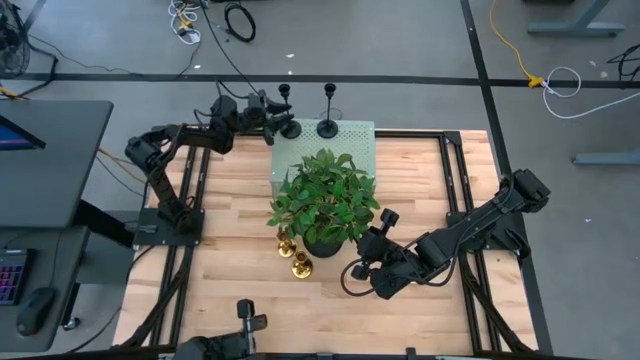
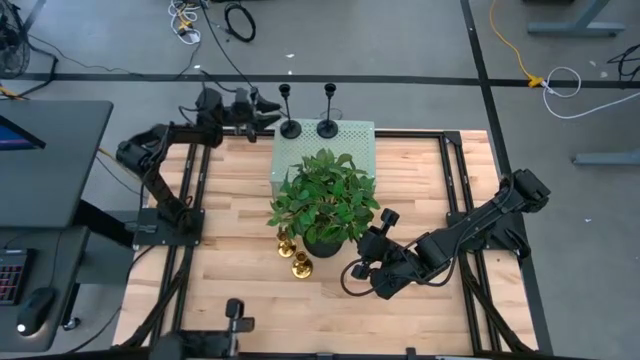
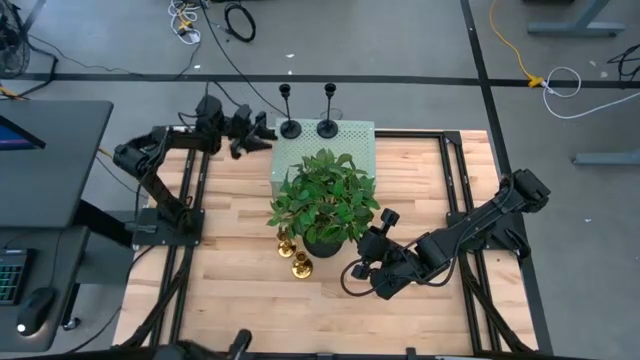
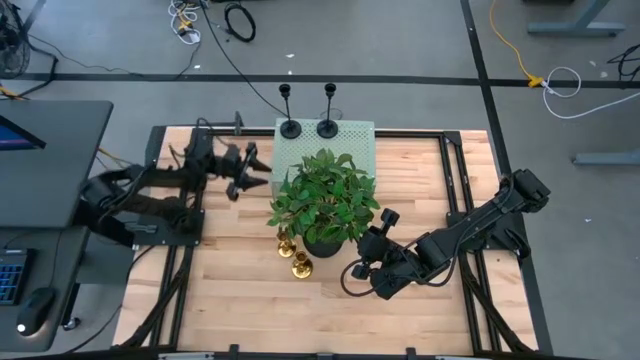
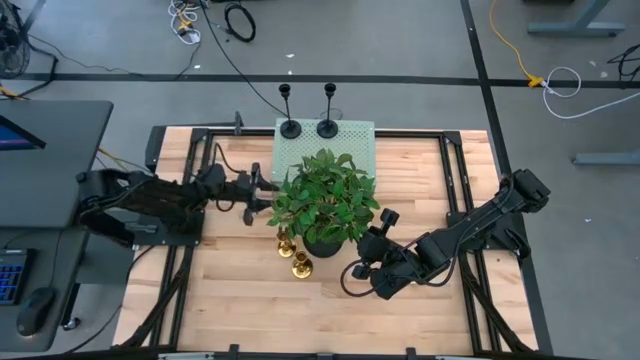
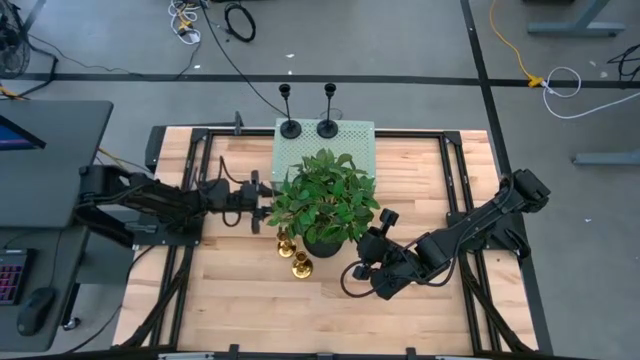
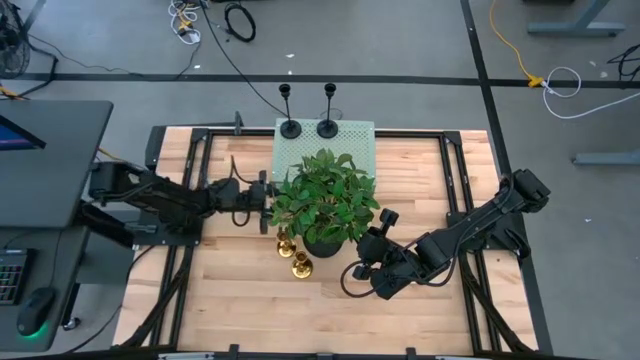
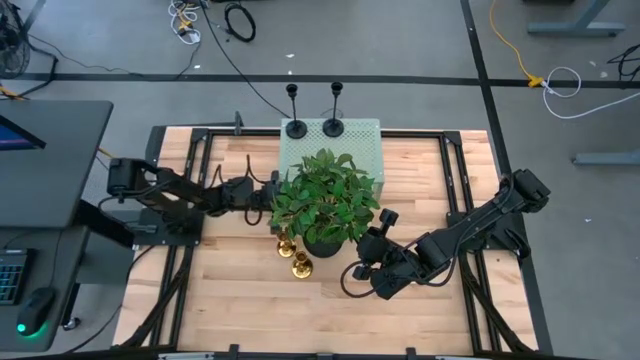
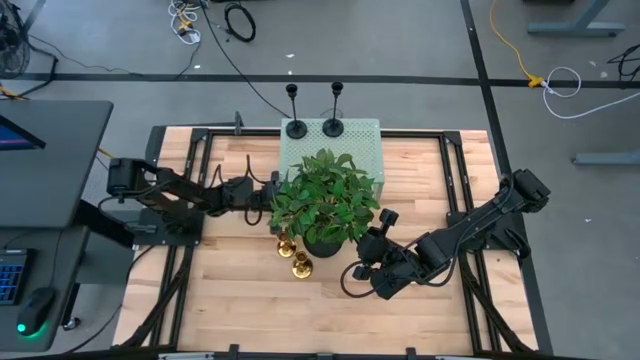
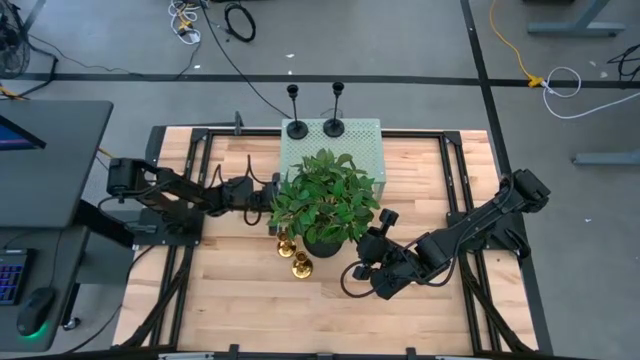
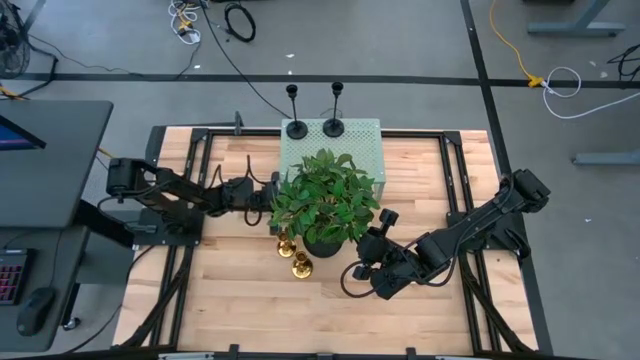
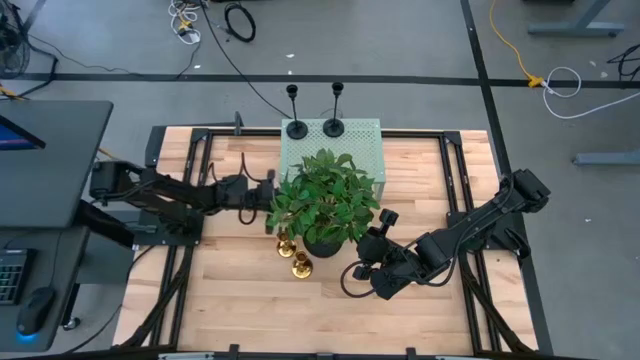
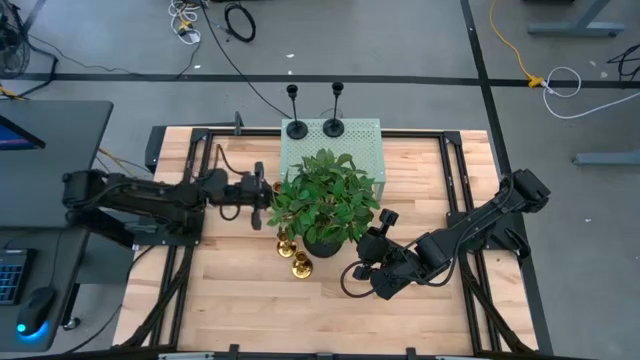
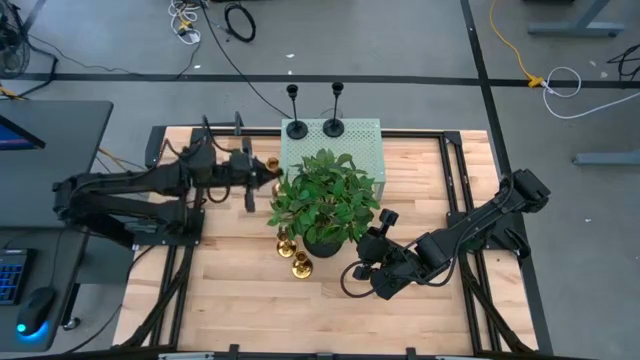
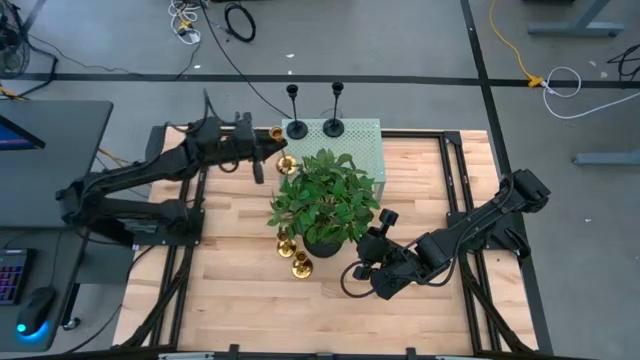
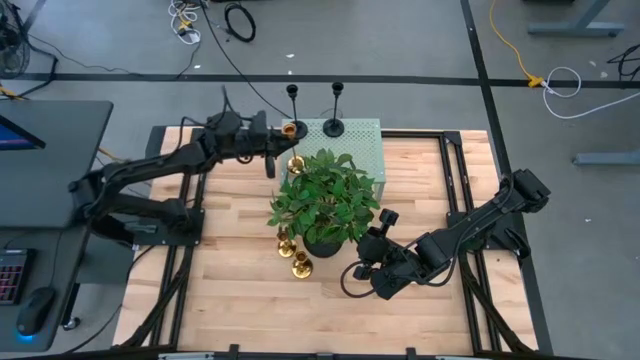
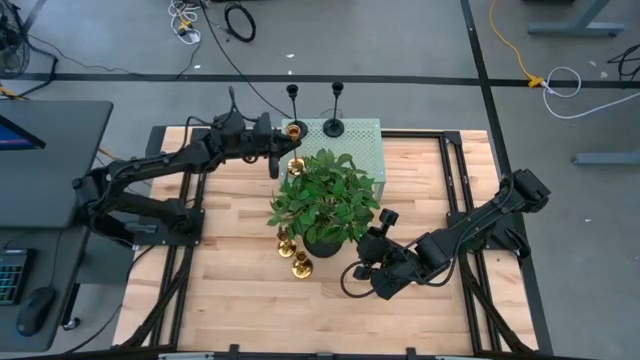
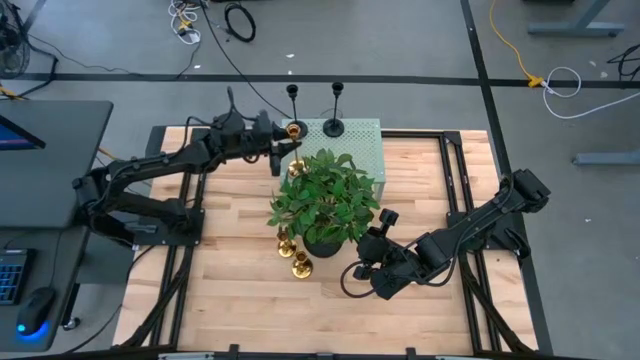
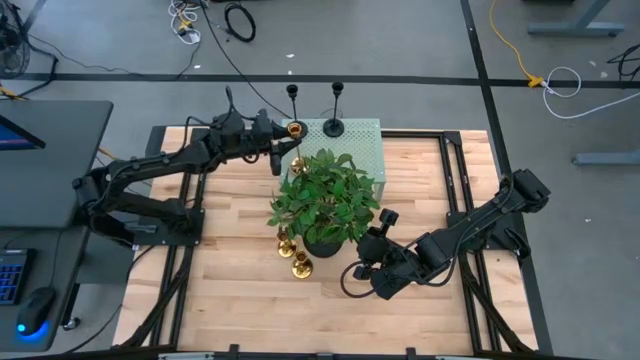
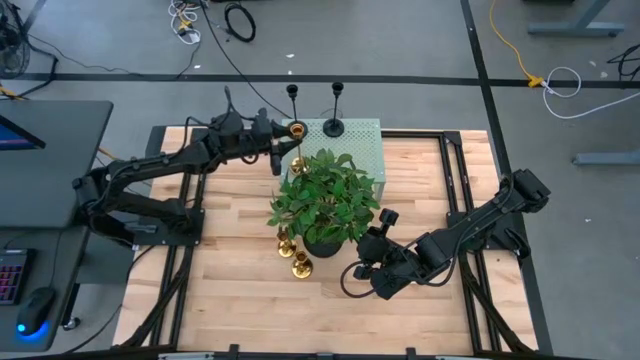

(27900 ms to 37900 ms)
Task: Pick & Place candle stick holders
Put the top gold candle holder on the shelf

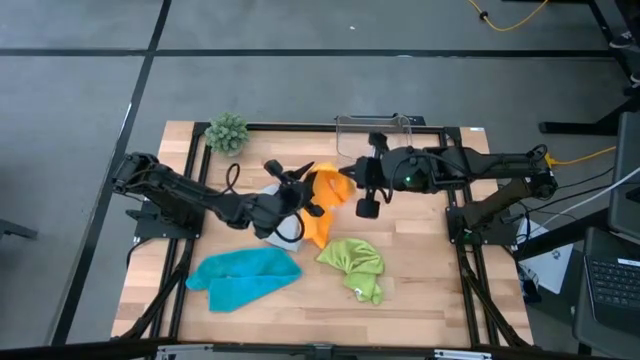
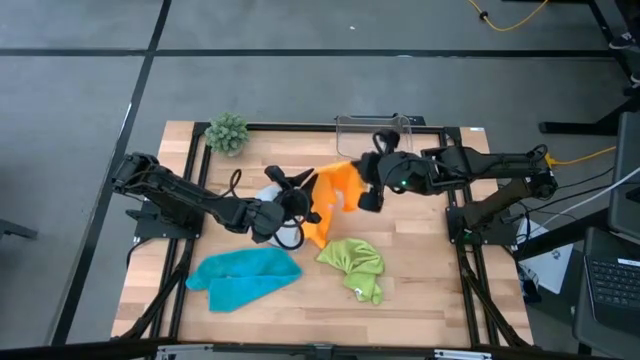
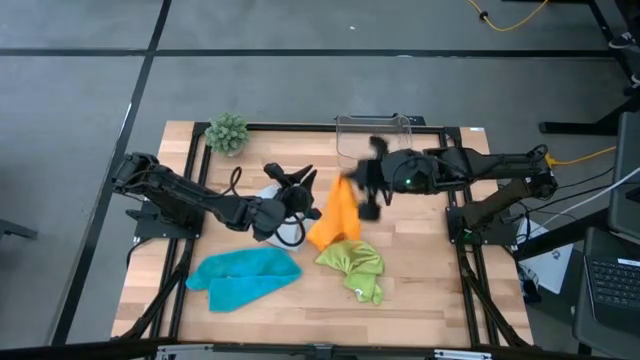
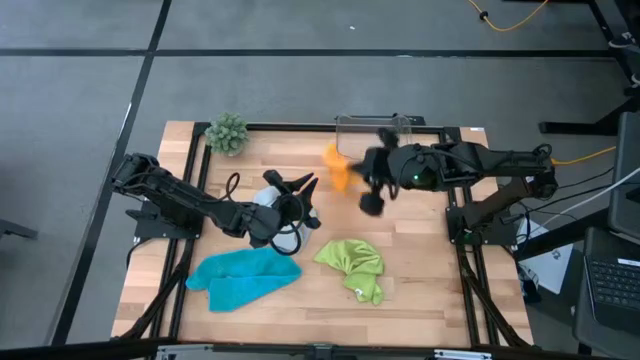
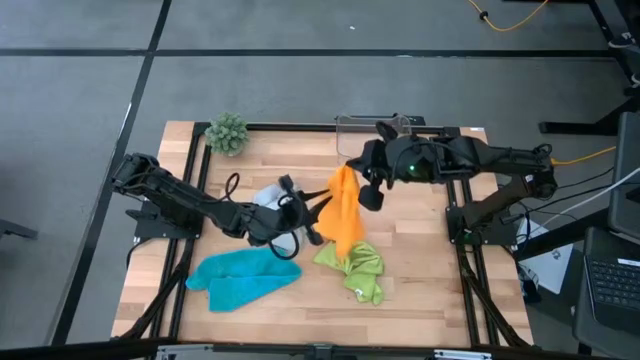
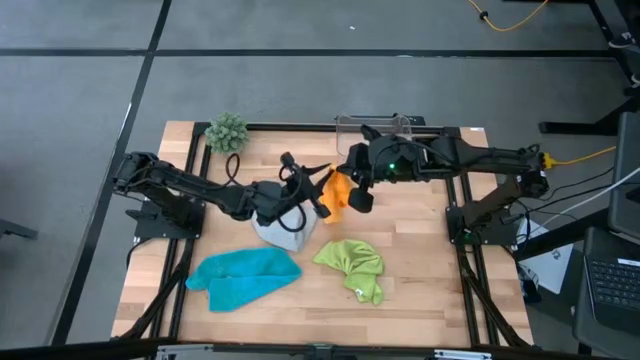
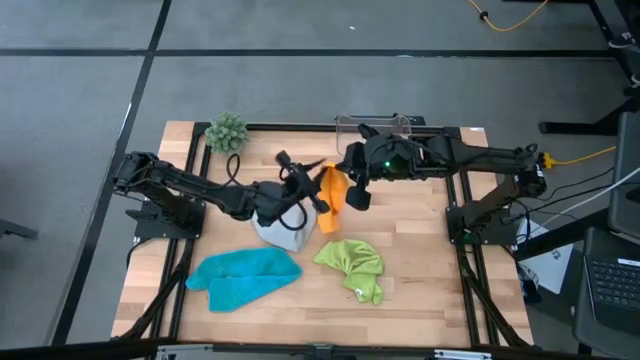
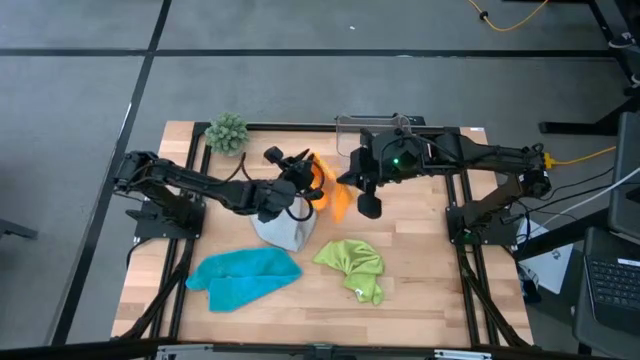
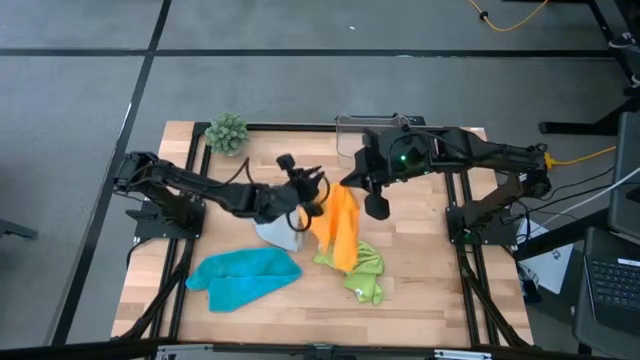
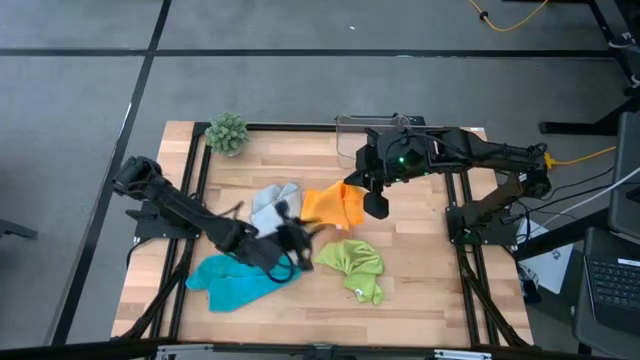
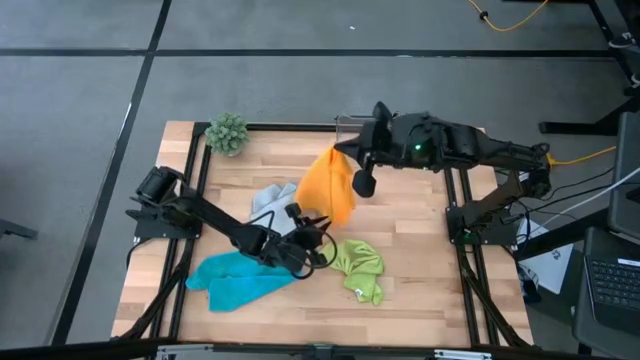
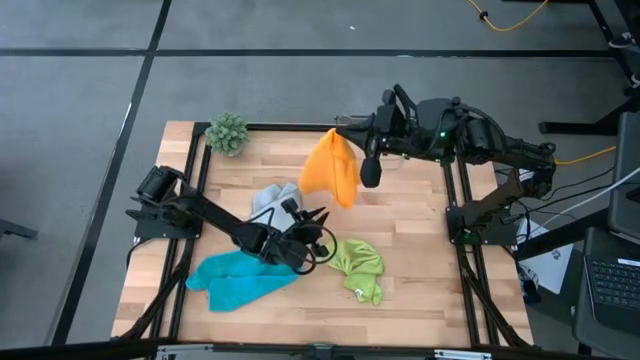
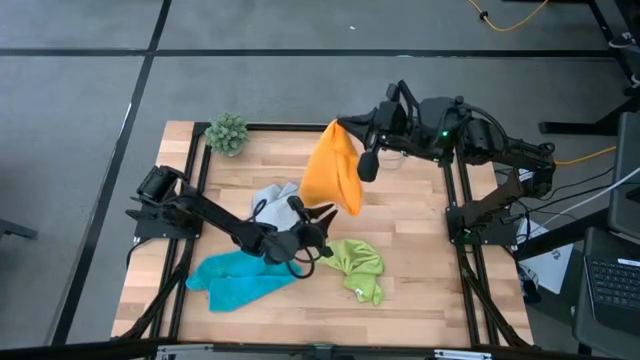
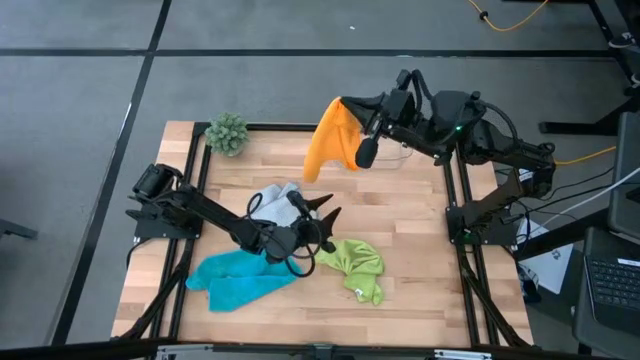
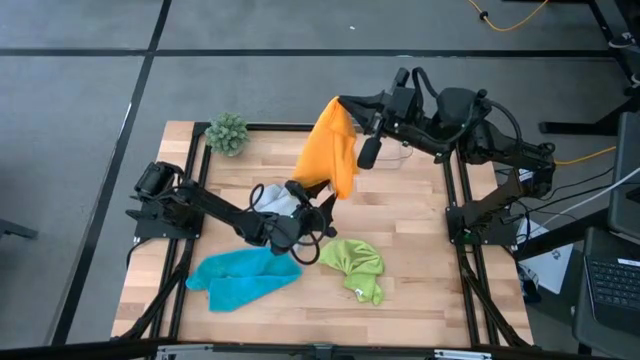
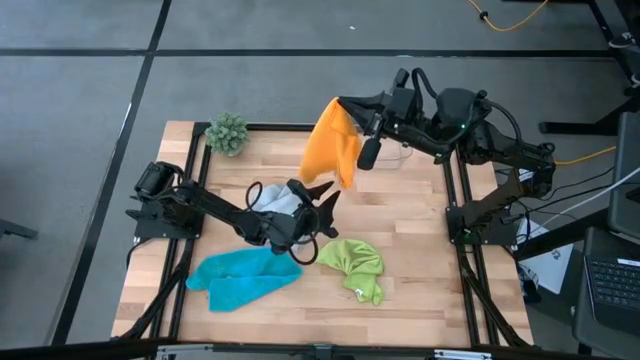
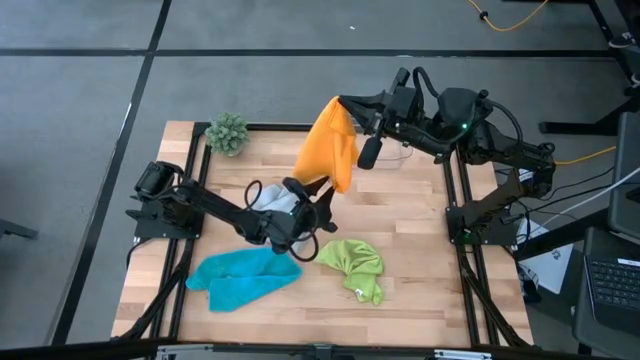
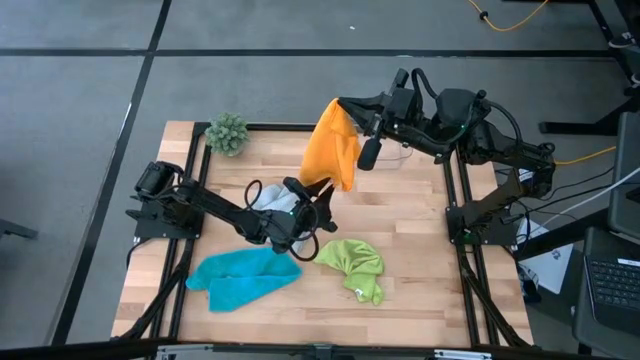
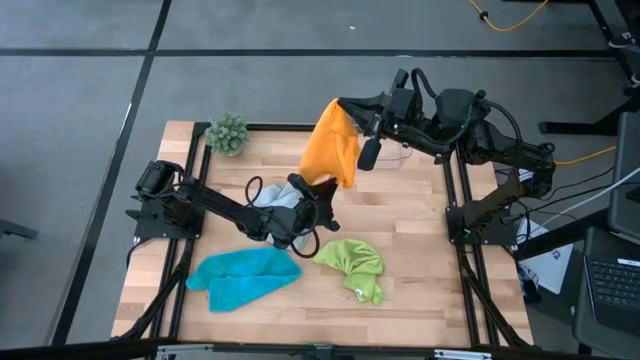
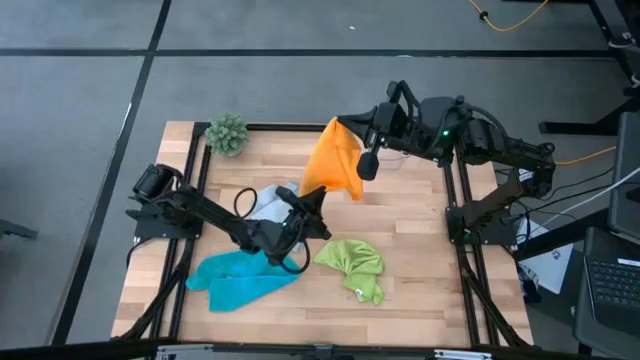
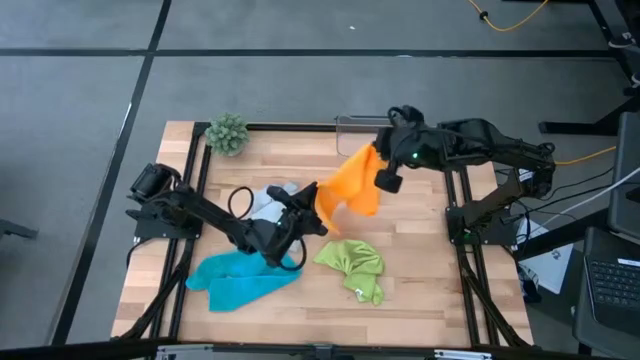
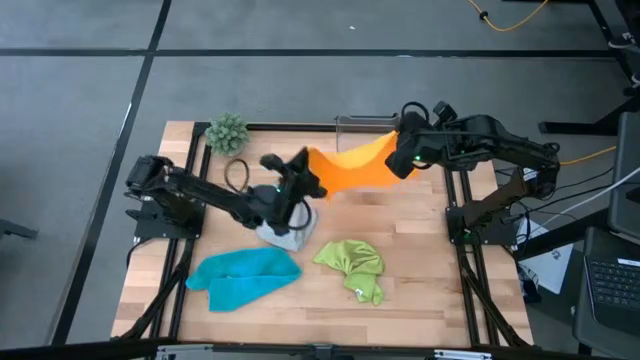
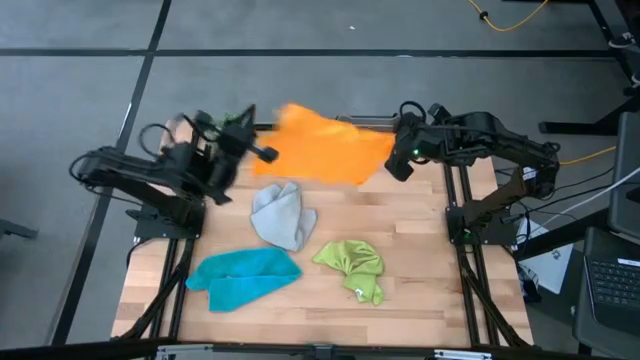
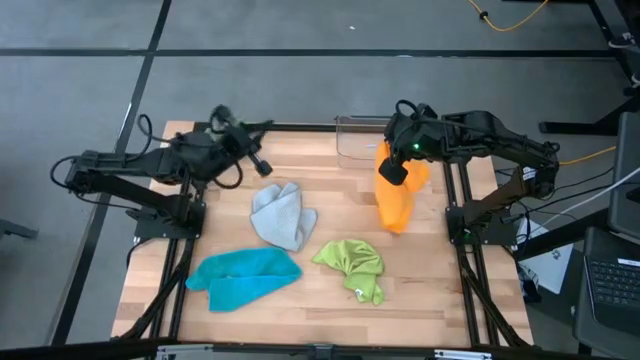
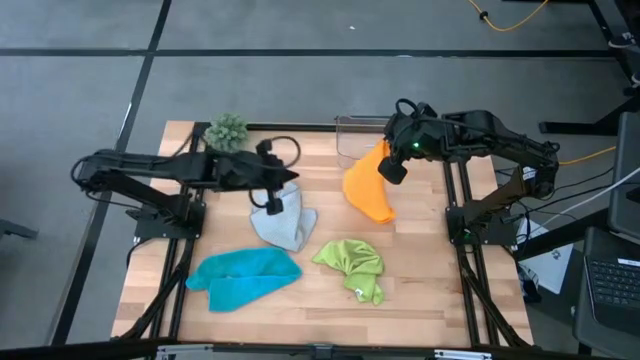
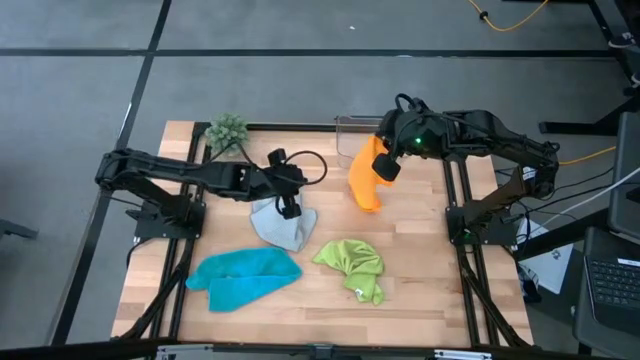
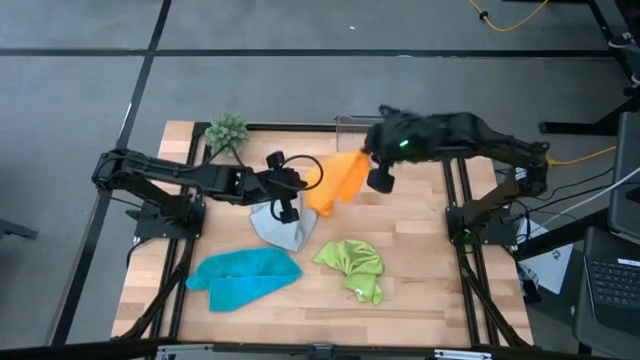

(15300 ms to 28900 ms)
Task: Fold microfiber towels
Fold the orange microfiber cloth
